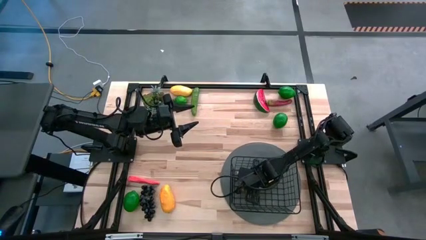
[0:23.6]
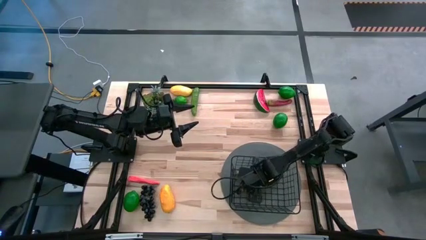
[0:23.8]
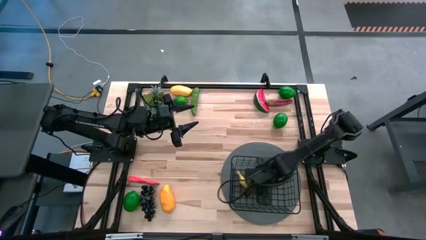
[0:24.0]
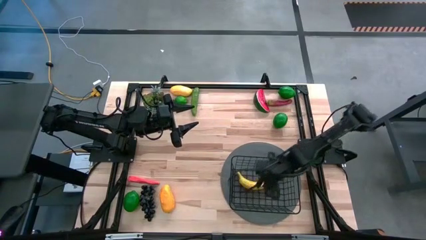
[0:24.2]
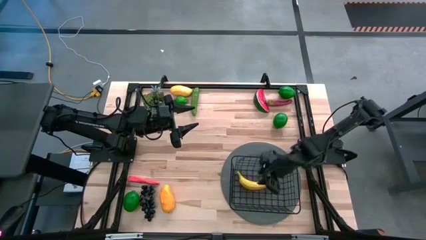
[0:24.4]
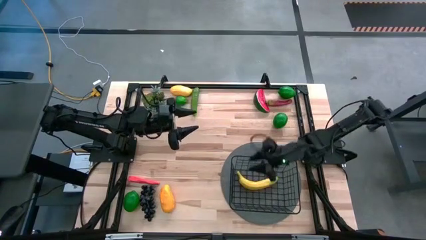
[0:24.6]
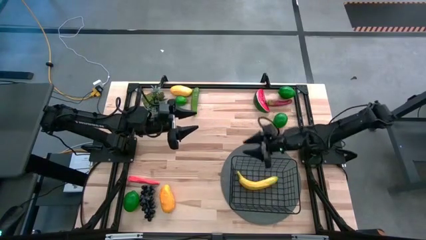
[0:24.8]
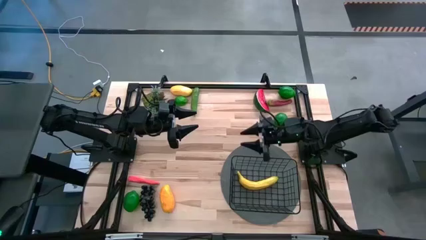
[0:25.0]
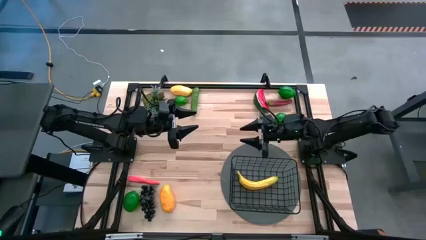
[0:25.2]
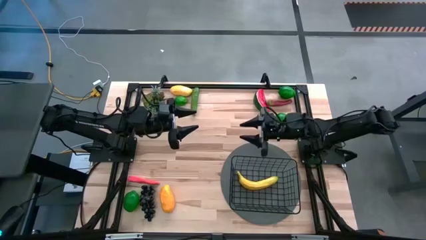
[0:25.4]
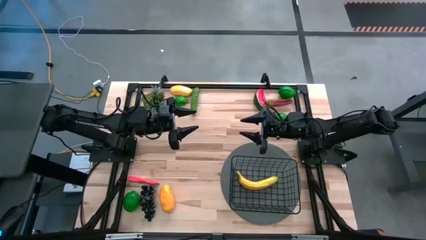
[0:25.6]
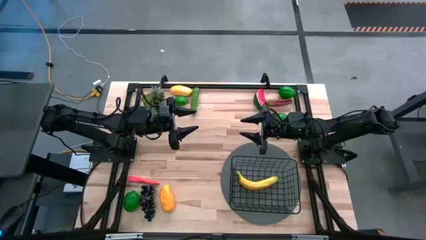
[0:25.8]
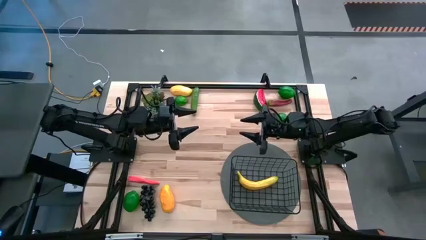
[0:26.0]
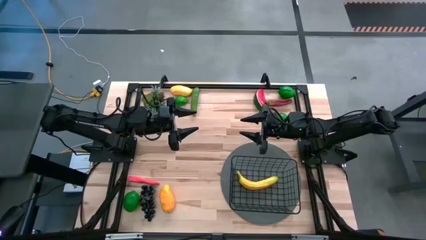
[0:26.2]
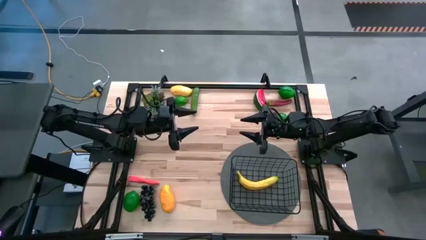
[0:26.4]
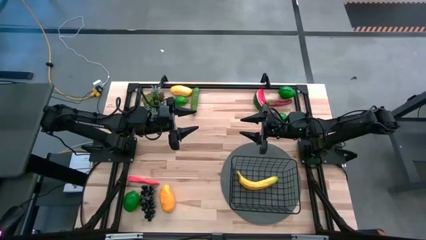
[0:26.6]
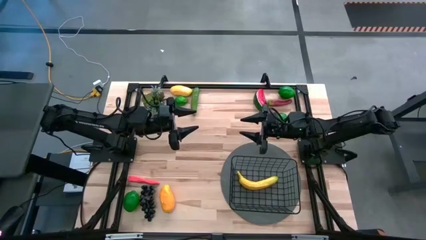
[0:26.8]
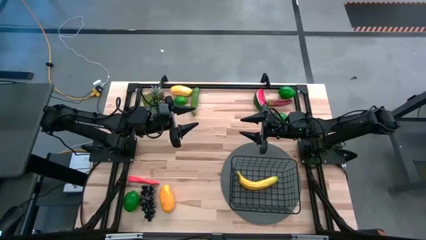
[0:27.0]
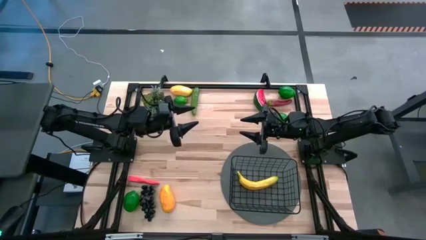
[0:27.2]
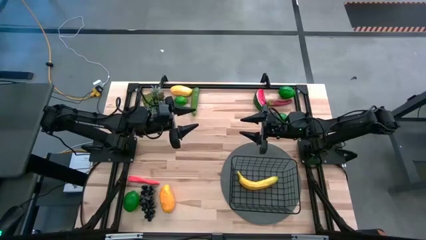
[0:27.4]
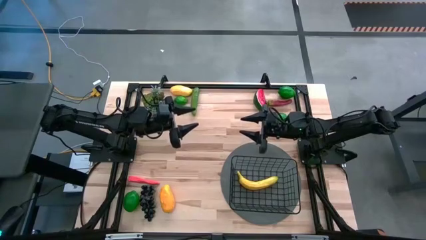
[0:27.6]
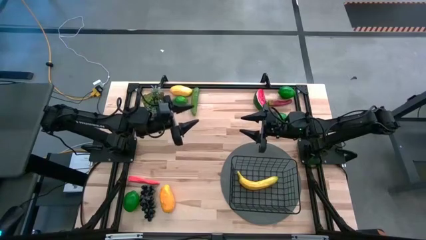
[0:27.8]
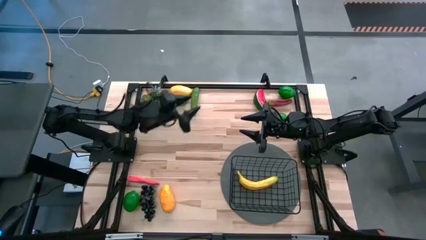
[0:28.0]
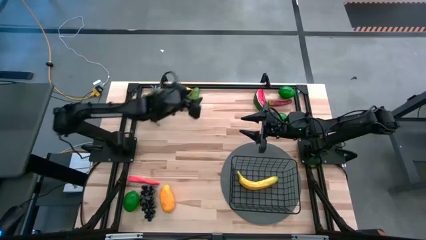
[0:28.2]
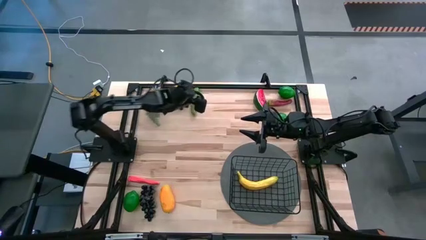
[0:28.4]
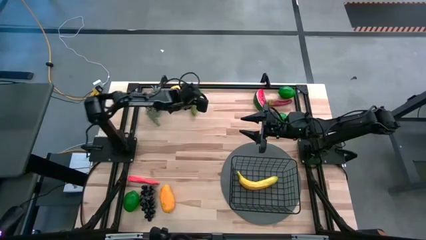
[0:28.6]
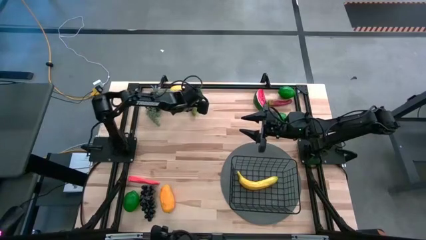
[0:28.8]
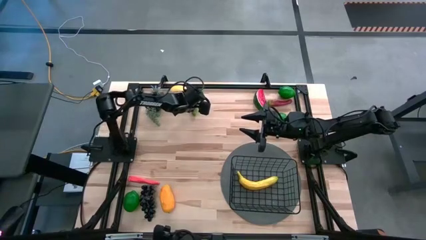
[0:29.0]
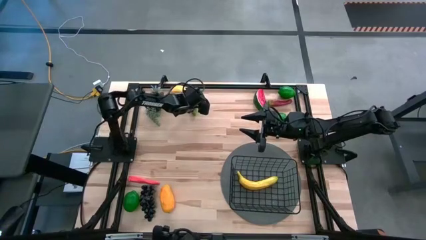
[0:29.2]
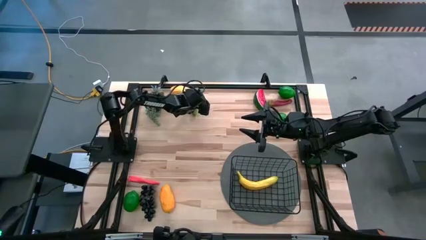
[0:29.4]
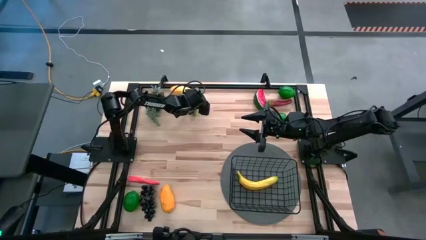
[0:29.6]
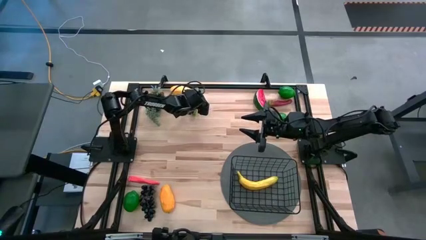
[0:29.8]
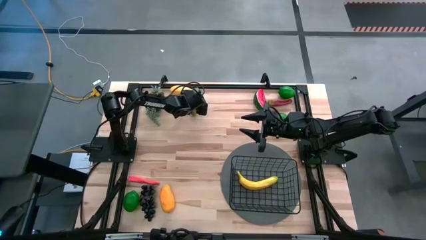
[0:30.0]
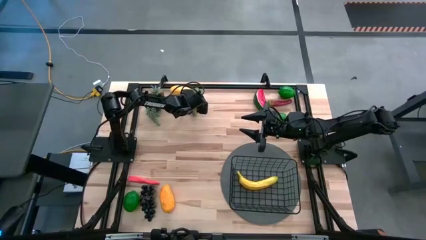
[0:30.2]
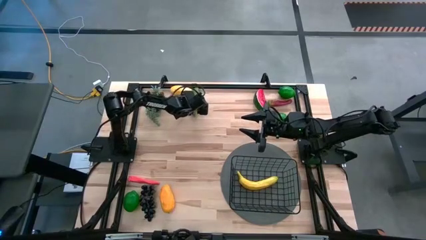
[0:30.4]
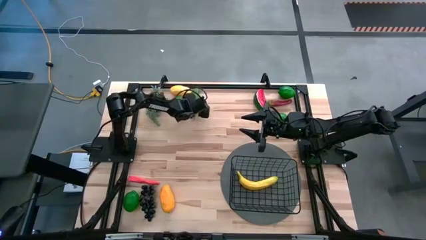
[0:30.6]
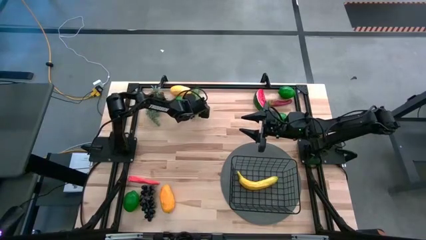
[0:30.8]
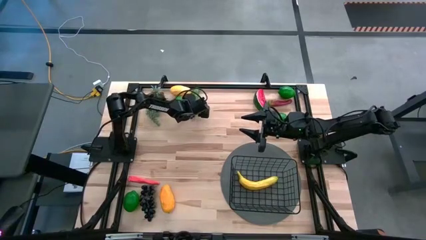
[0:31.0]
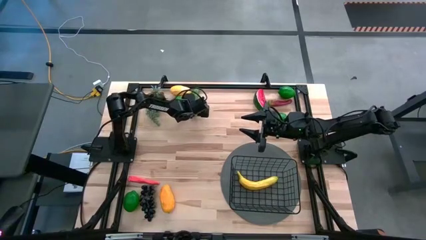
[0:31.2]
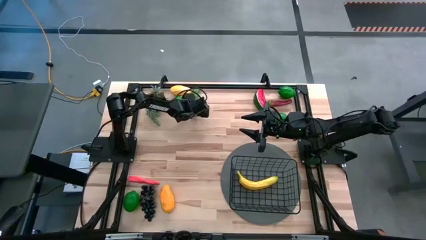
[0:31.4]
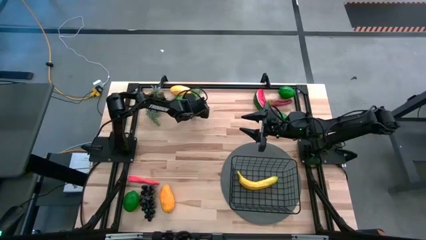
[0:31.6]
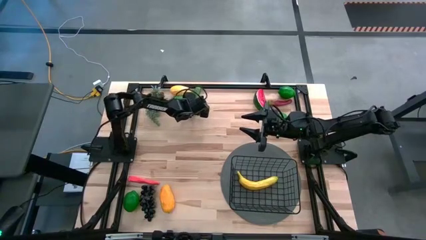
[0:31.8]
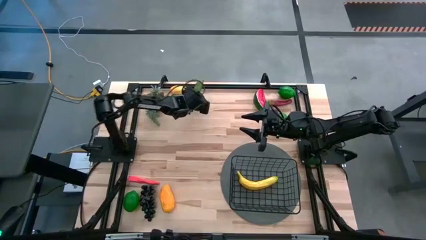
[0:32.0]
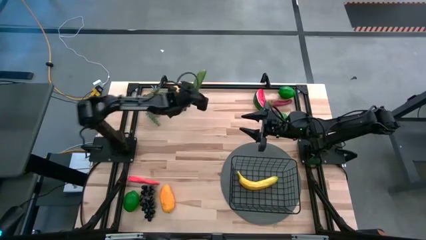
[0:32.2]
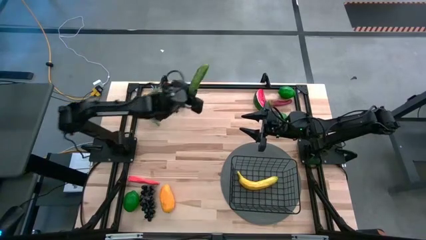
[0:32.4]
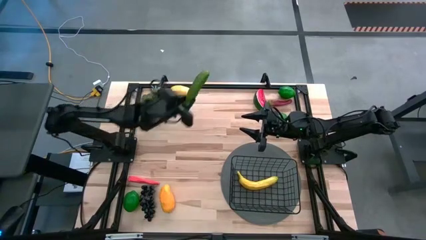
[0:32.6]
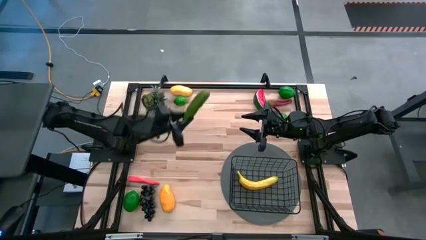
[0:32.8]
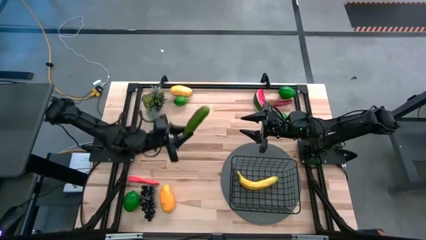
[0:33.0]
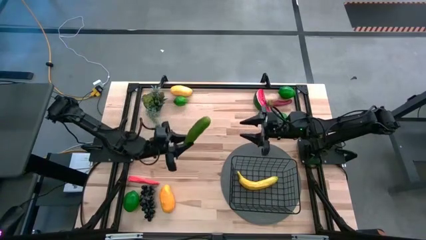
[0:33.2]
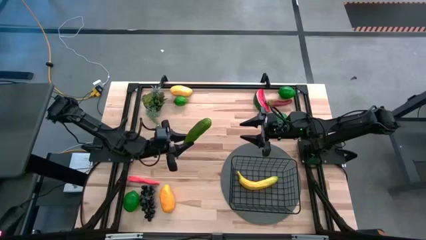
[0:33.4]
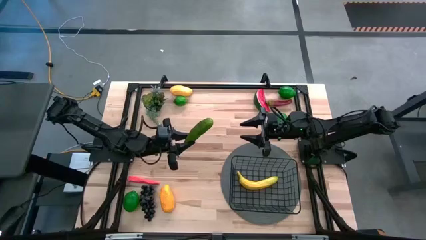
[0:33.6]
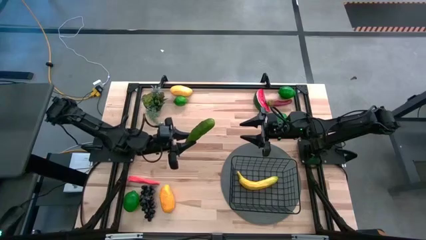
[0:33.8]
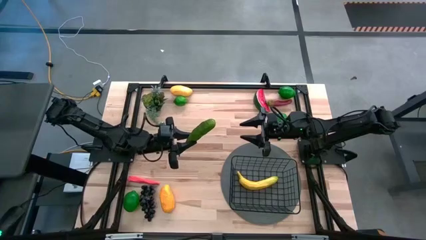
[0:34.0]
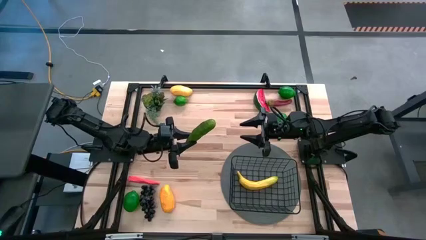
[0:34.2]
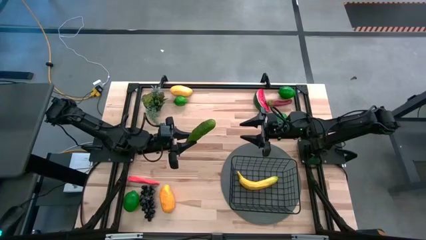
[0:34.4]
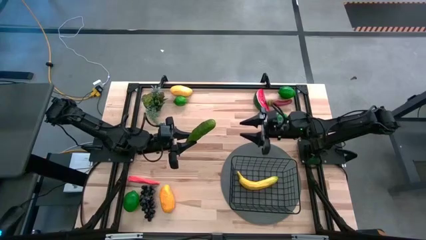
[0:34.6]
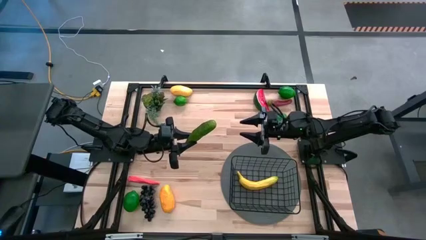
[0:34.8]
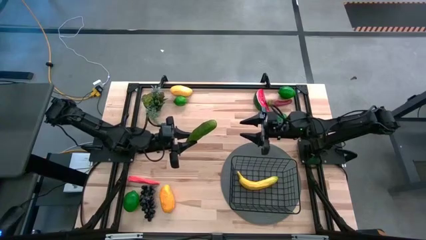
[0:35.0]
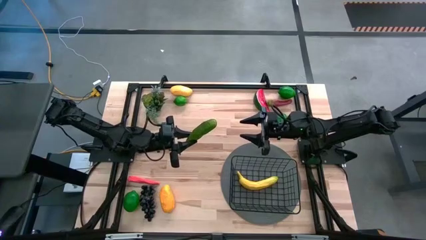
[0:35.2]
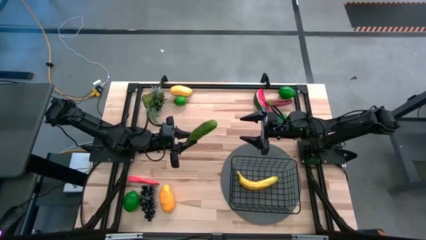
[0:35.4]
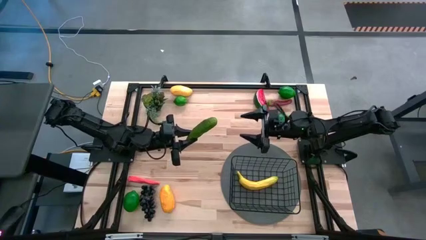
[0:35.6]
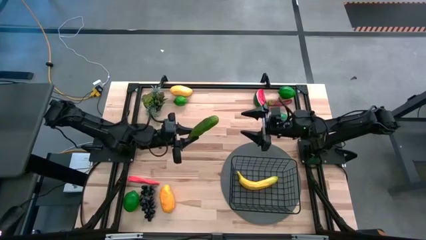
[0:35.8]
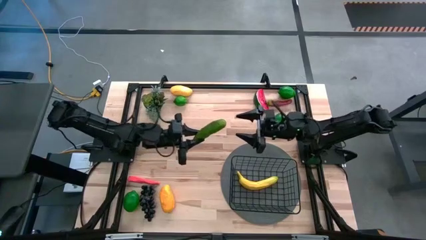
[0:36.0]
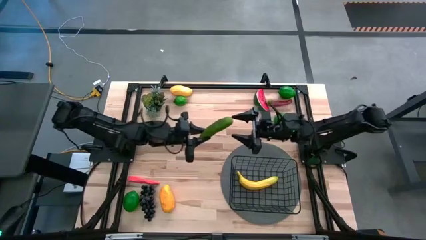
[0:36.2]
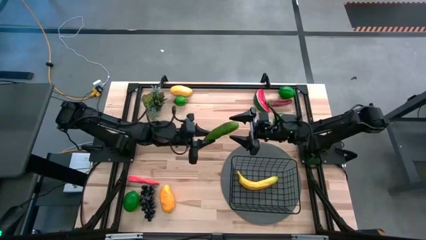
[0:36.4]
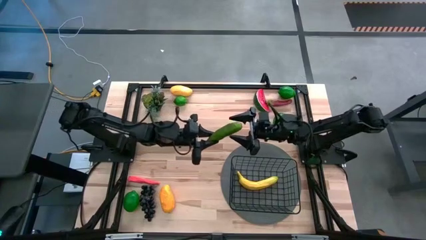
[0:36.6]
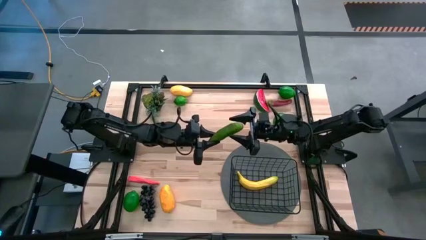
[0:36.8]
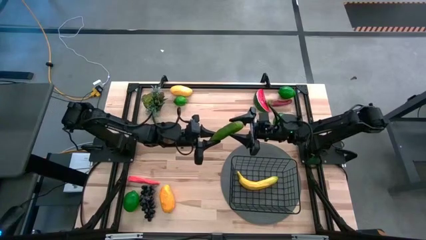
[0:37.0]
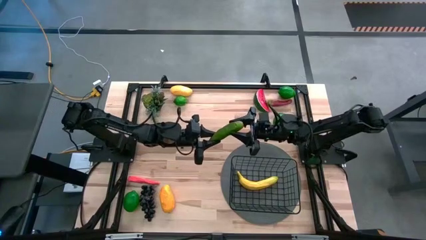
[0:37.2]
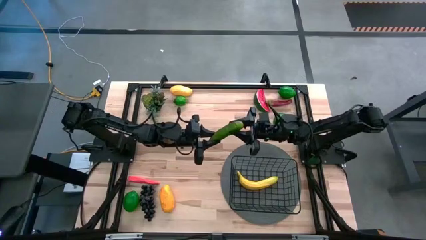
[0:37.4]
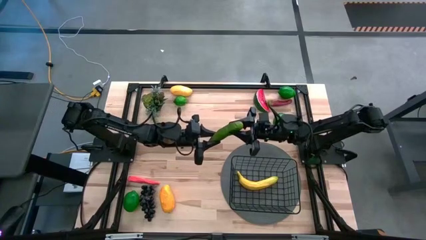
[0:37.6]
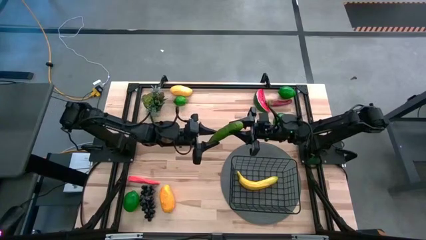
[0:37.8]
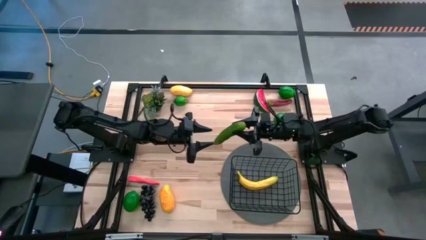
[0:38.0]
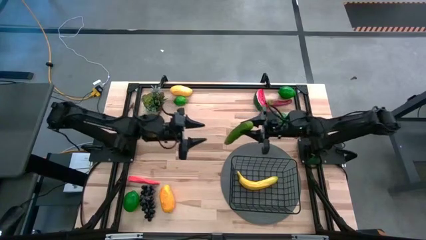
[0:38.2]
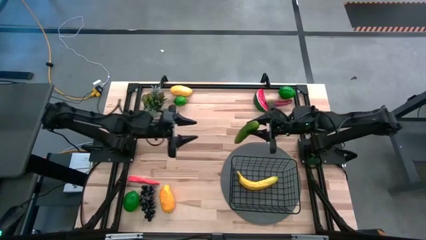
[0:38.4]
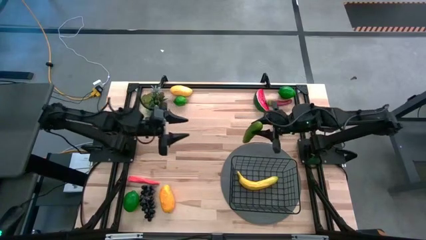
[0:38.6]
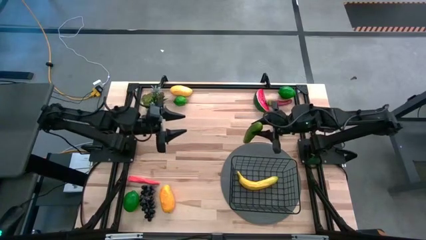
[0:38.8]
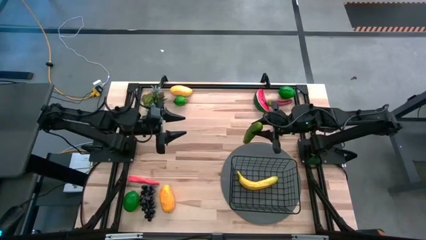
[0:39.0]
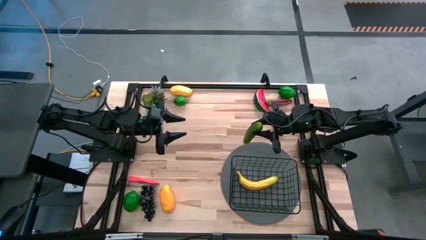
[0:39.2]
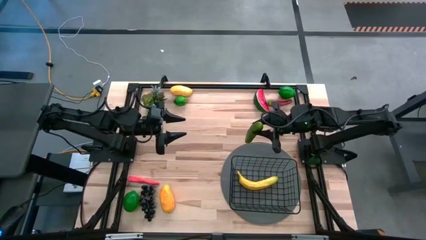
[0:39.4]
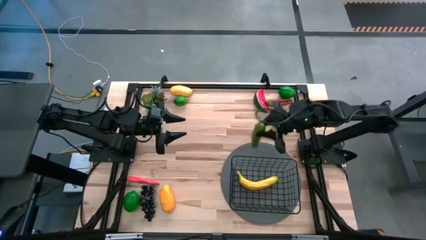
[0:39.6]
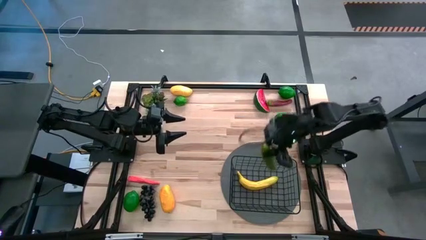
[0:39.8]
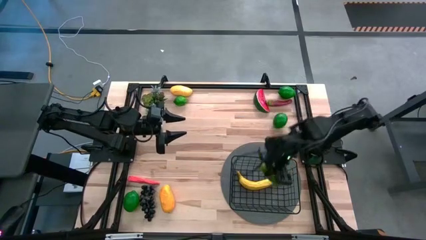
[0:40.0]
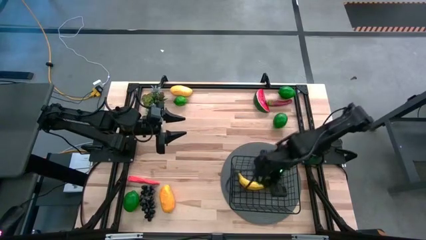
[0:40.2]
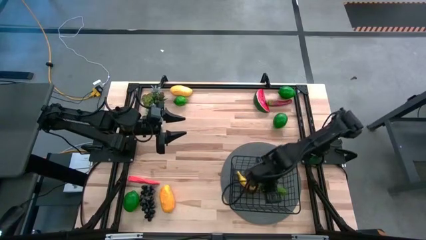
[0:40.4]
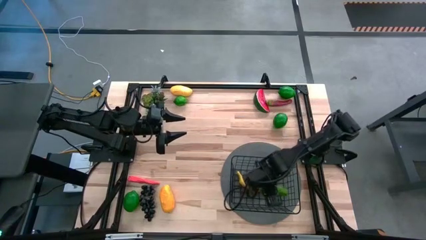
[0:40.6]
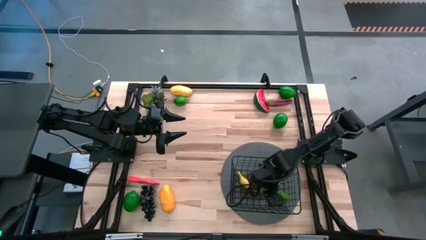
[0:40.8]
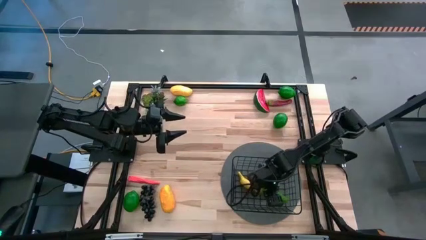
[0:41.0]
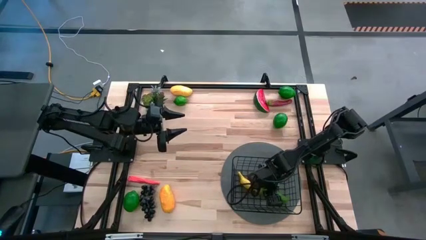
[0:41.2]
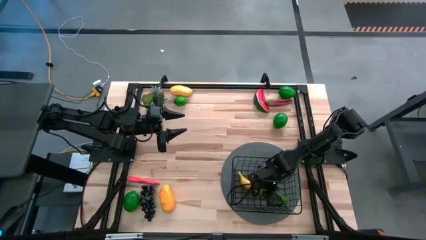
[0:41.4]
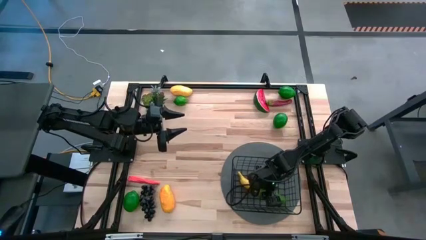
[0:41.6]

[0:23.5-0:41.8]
Task: Build produce basket
Put the green cucumber into the black basket
